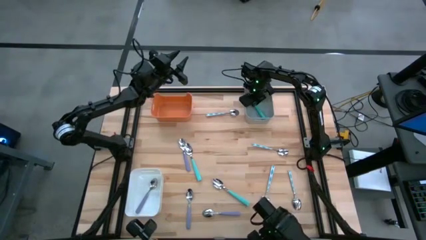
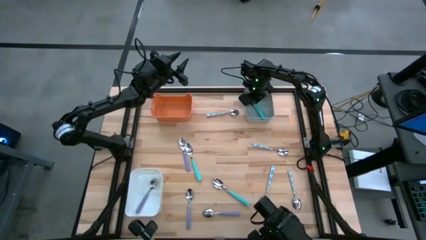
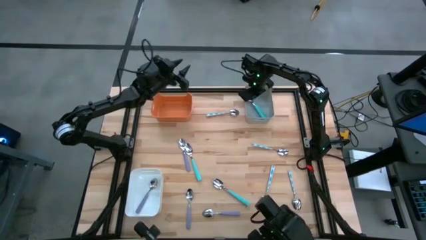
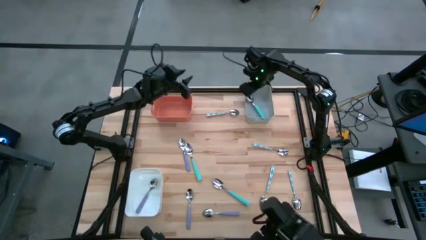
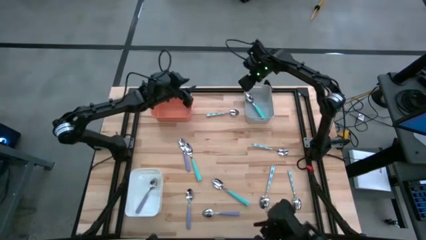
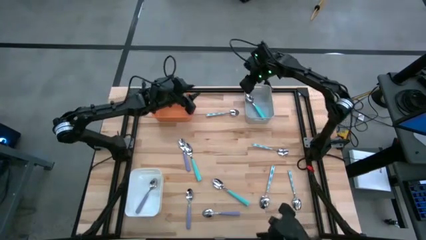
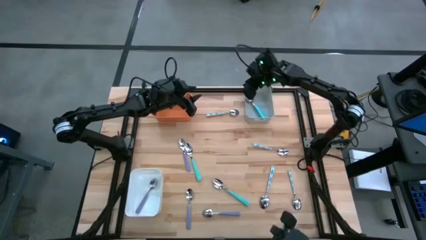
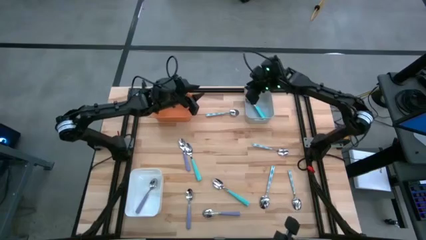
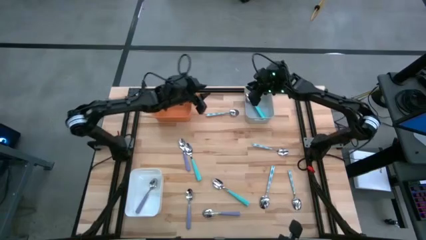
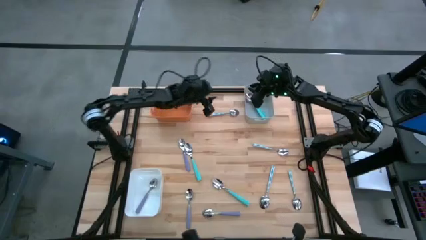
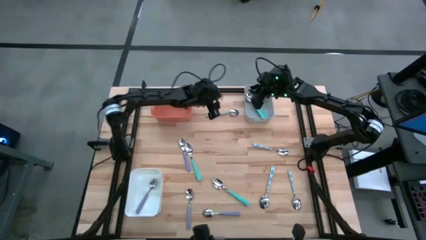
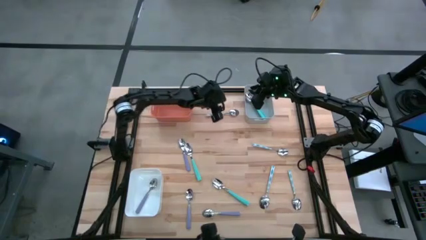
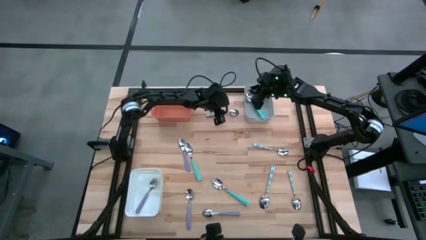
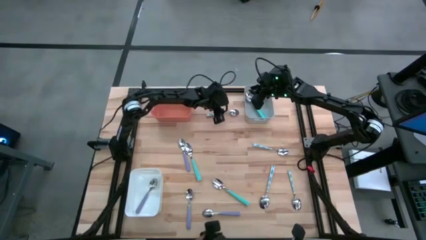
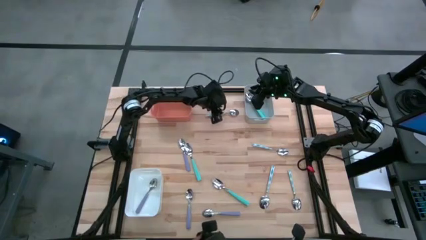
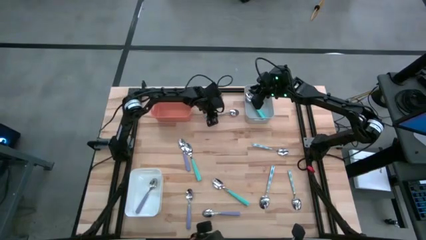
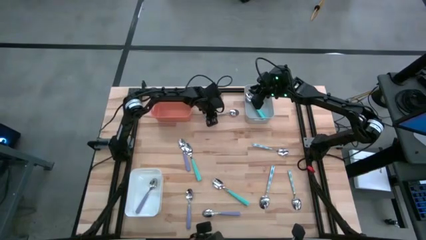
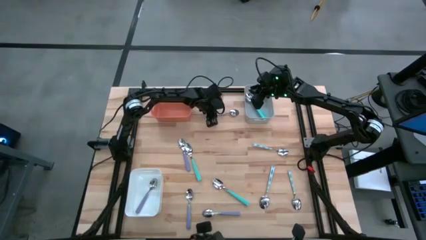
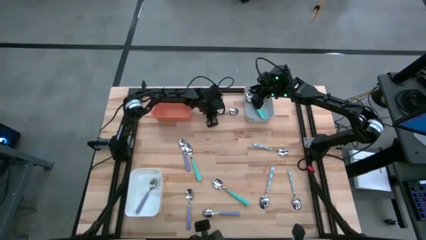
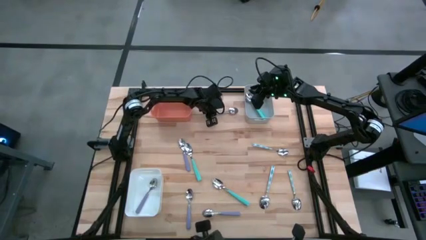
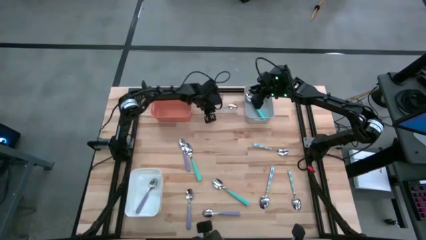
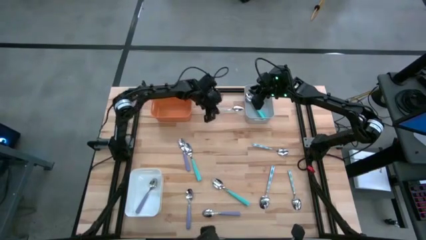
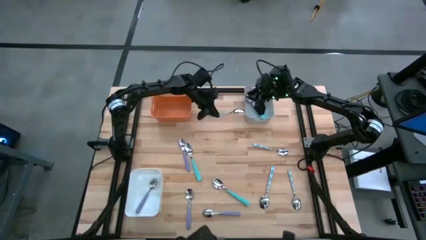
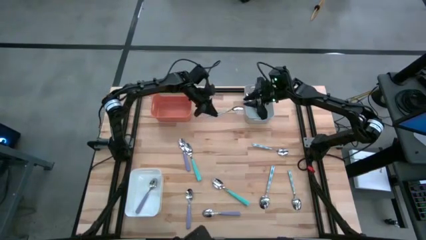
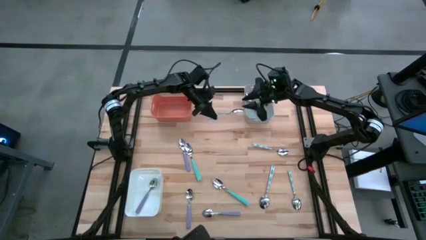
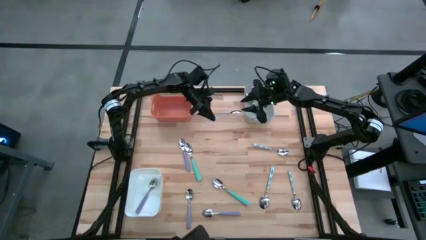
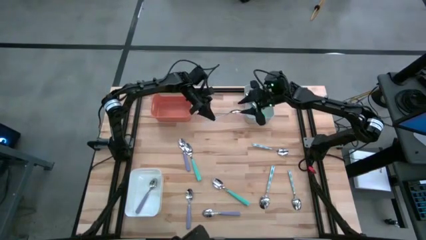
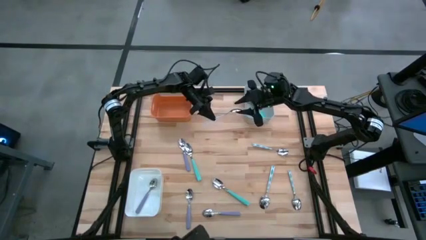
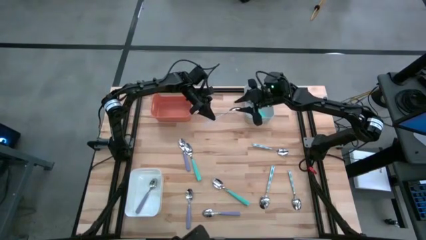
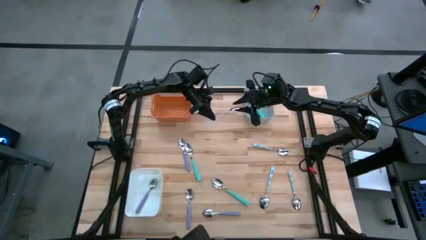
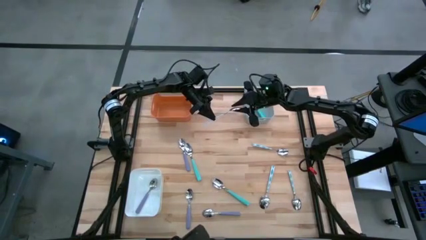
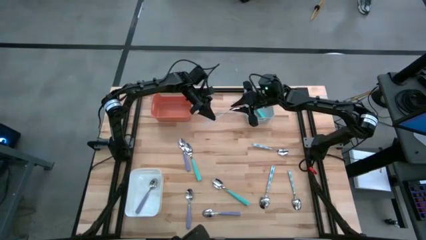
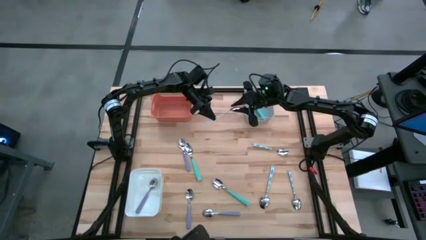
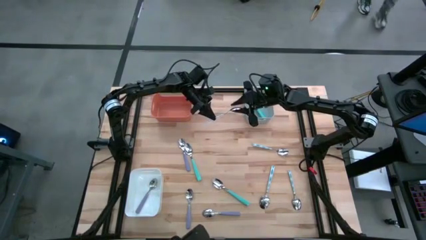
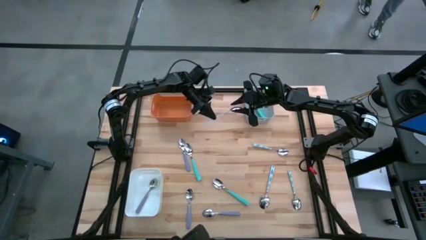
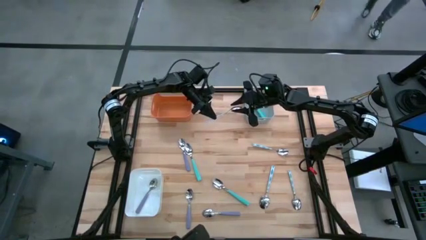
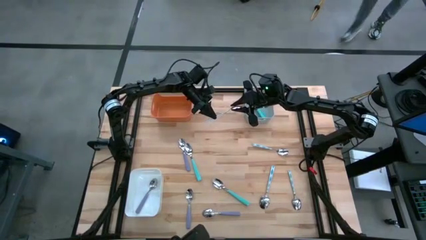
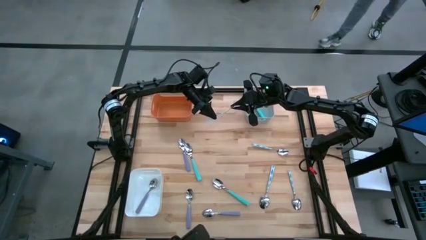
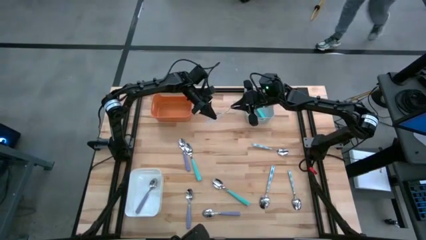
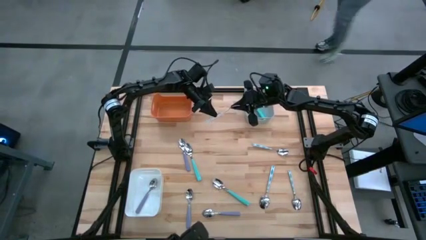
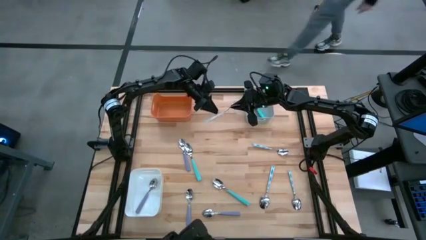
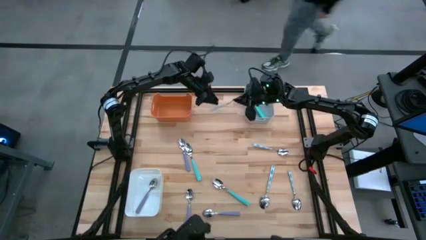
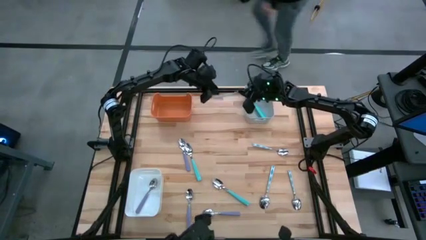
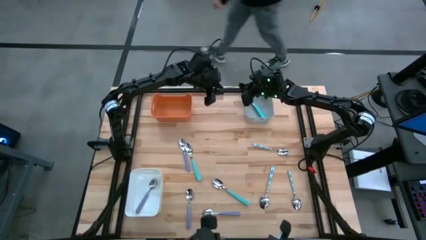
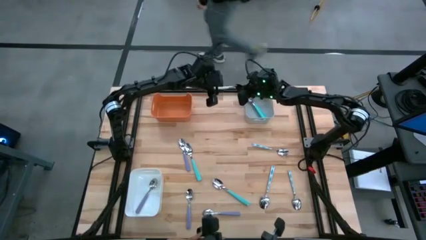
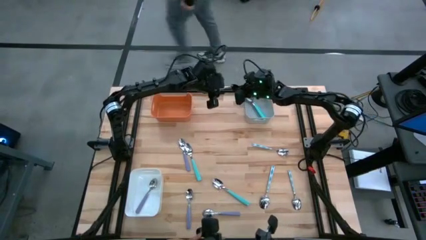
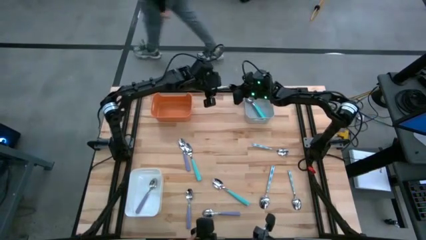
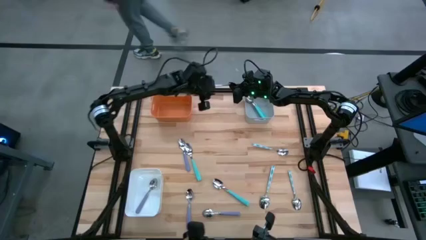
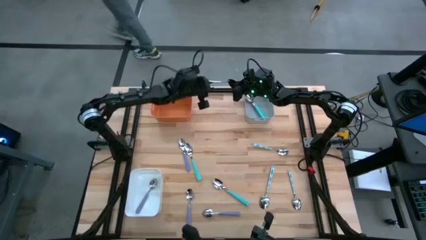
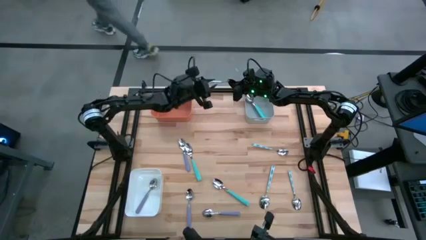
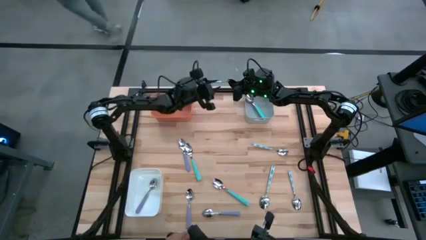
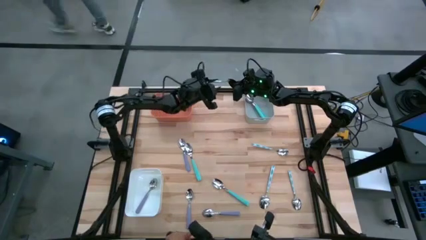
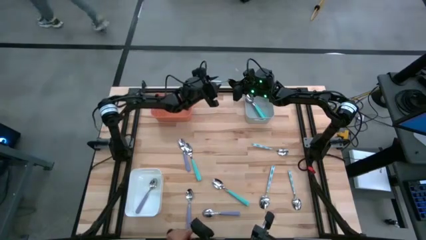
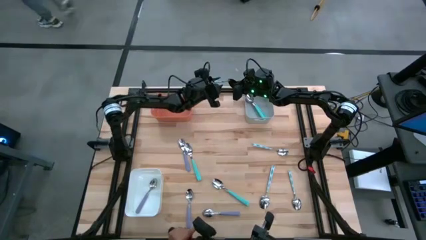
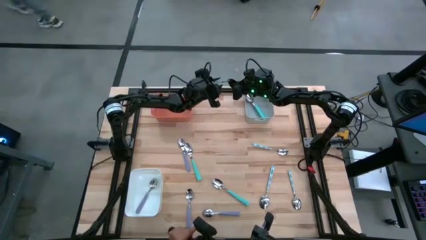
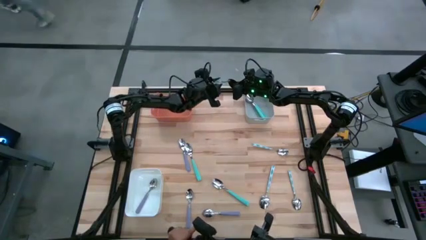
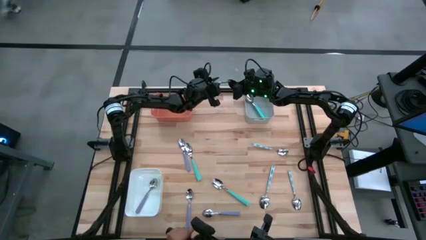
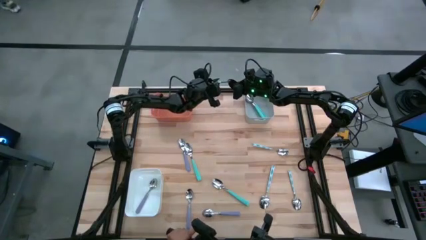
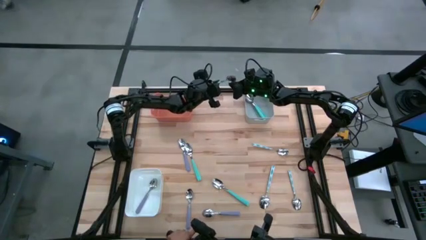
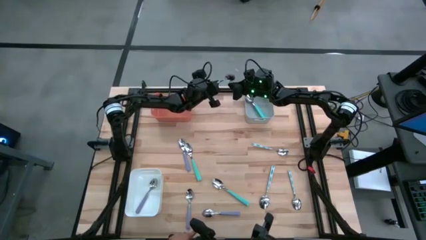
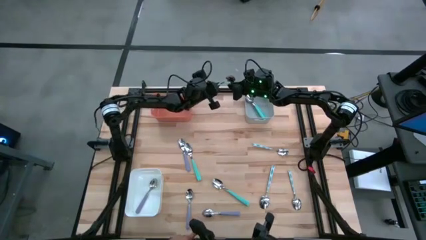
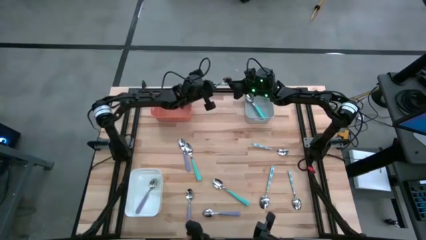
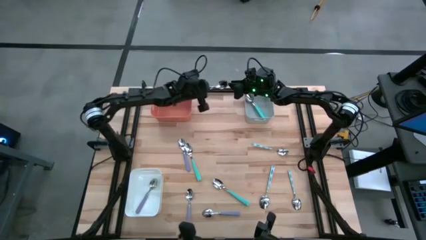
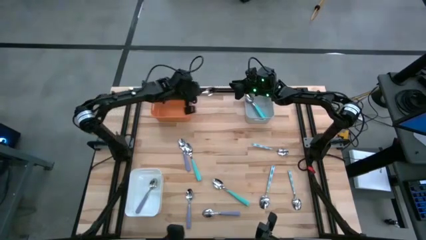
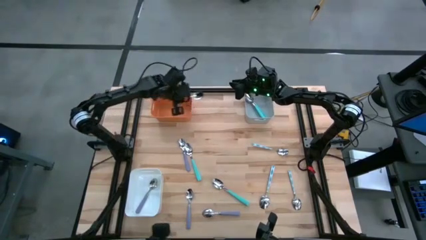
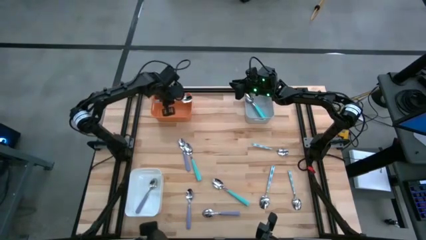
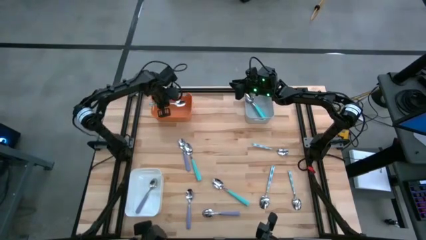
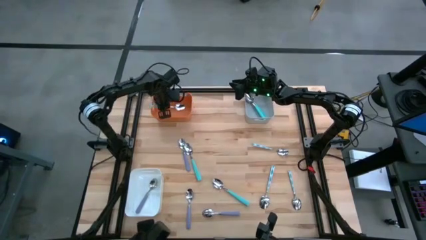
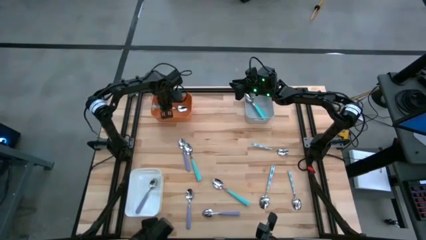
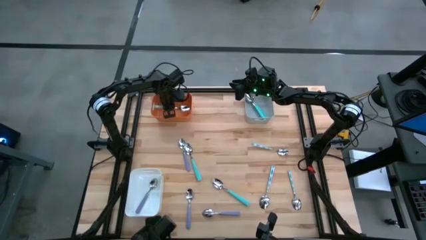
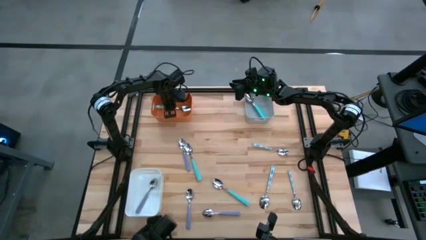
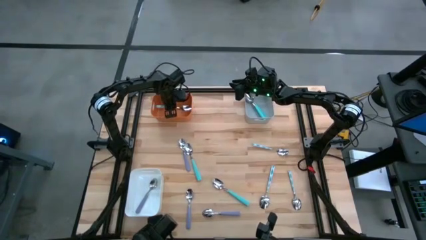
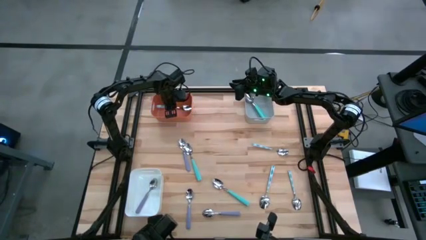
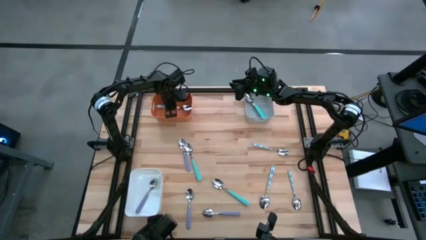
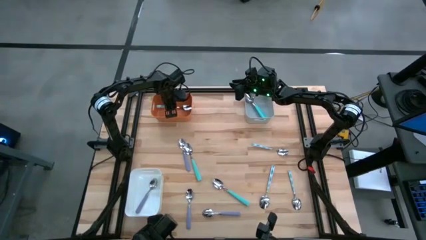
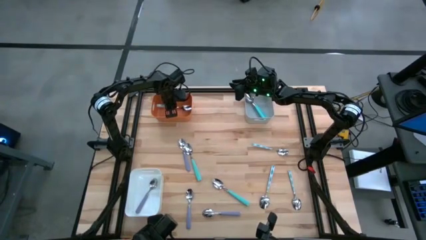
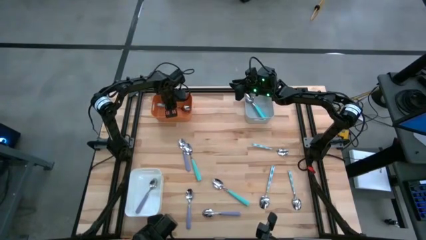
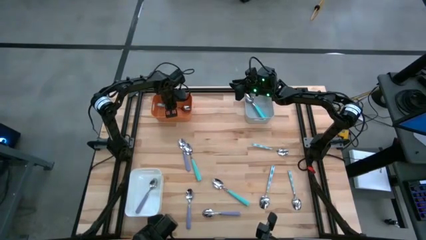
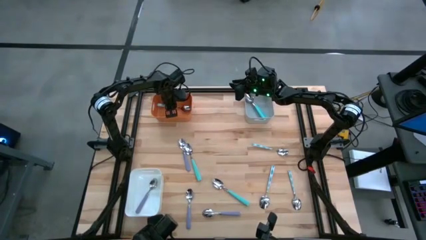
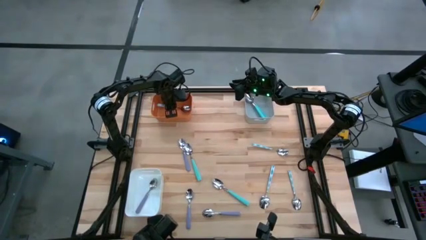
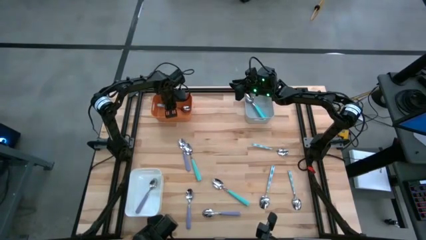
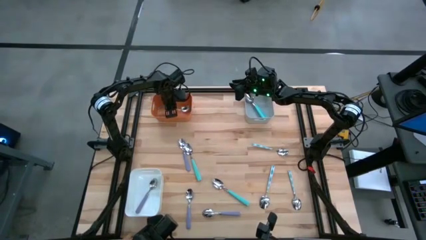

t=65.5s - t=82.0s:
Task: Sort silverware by color (type)
Put the blue patterned spoon into the orange bin
